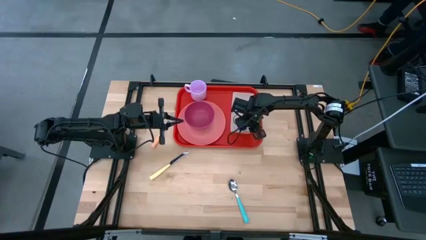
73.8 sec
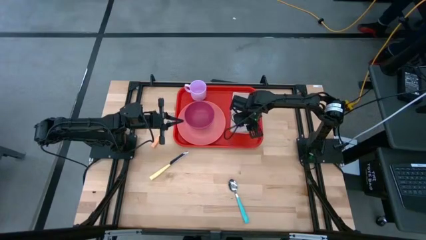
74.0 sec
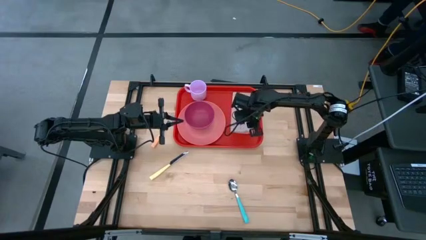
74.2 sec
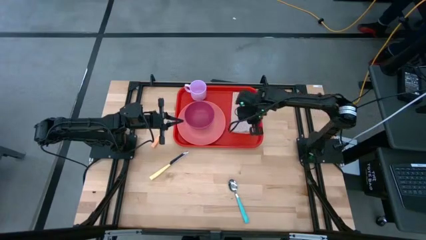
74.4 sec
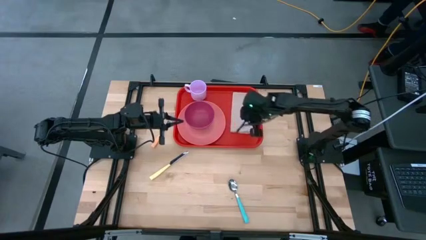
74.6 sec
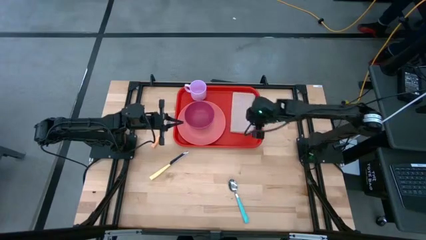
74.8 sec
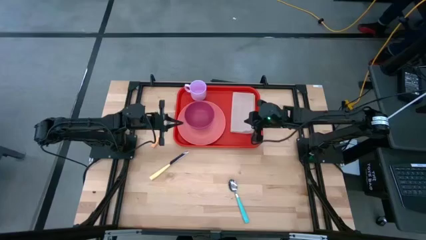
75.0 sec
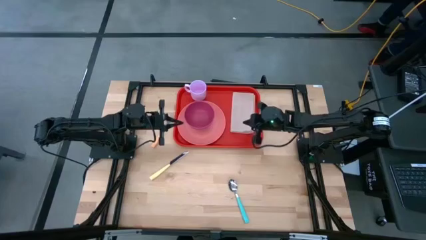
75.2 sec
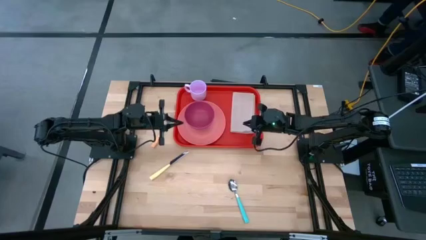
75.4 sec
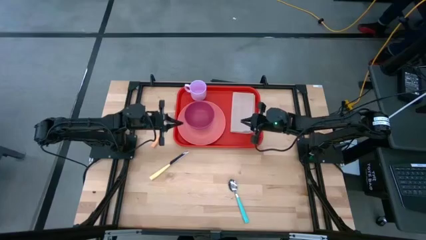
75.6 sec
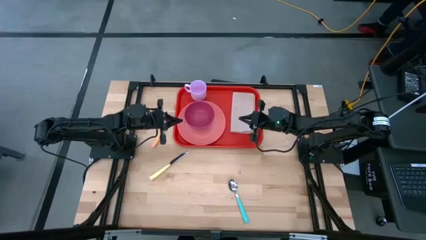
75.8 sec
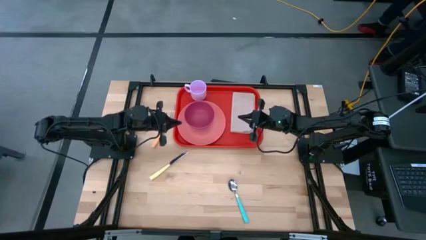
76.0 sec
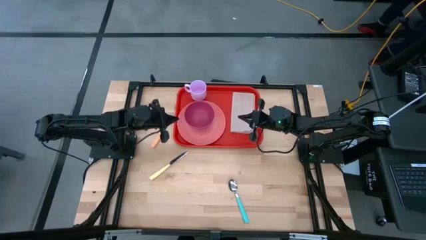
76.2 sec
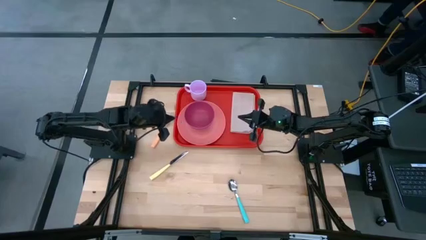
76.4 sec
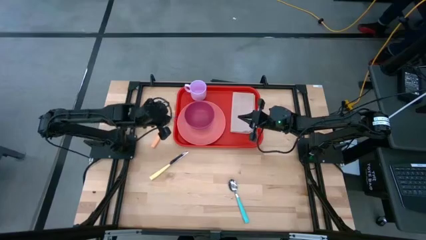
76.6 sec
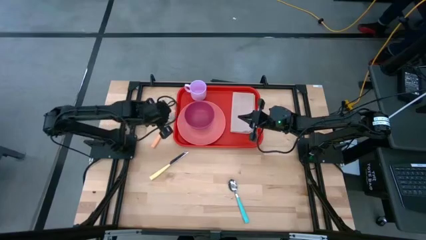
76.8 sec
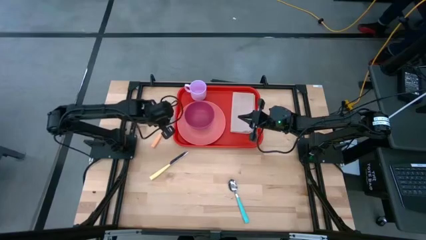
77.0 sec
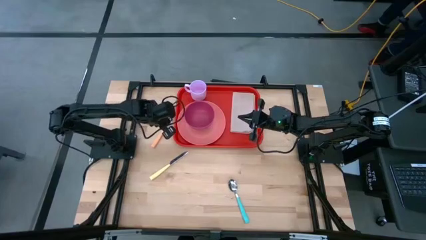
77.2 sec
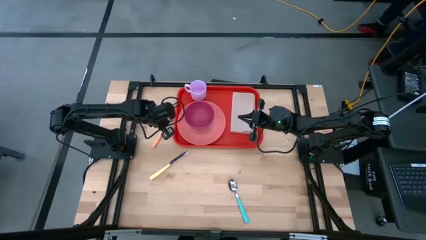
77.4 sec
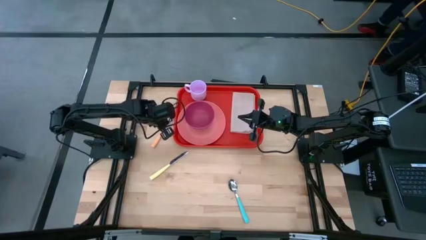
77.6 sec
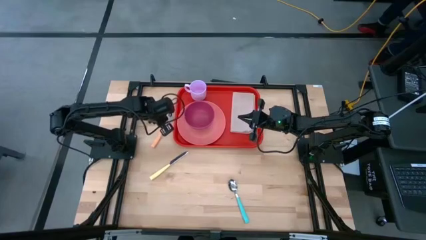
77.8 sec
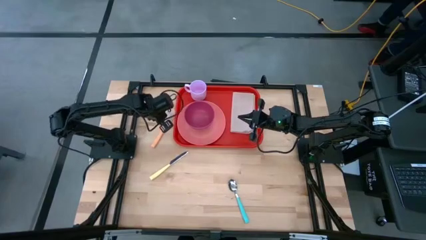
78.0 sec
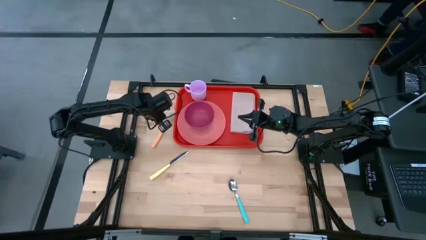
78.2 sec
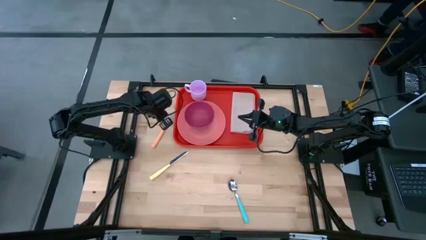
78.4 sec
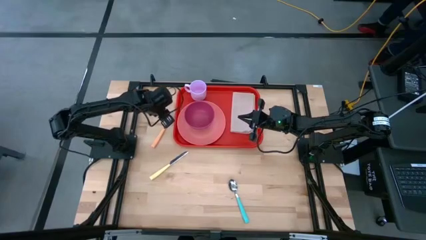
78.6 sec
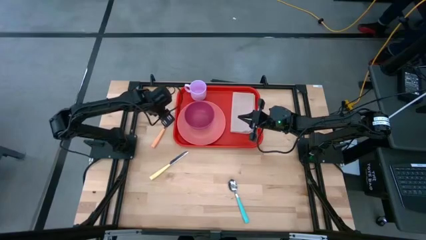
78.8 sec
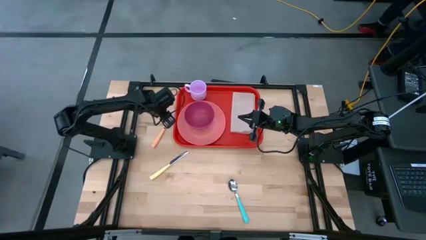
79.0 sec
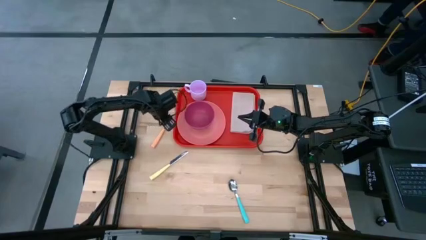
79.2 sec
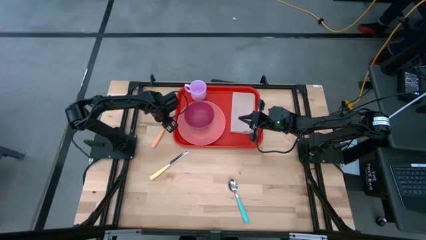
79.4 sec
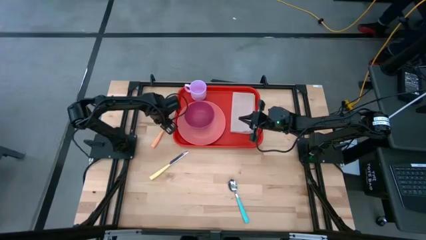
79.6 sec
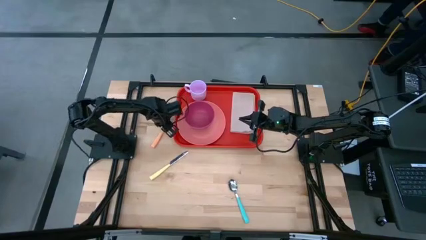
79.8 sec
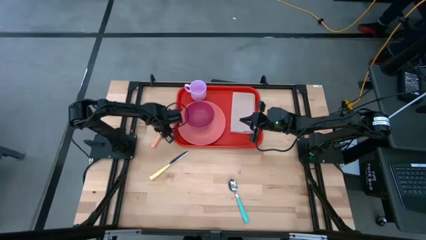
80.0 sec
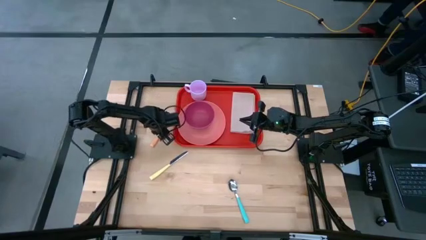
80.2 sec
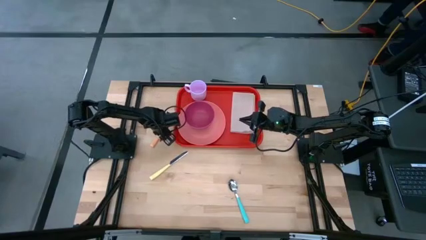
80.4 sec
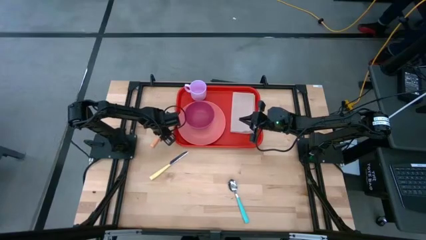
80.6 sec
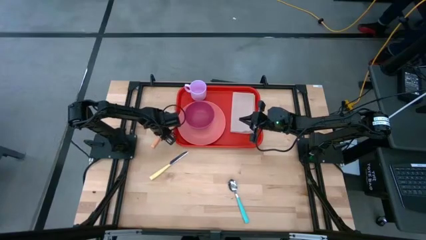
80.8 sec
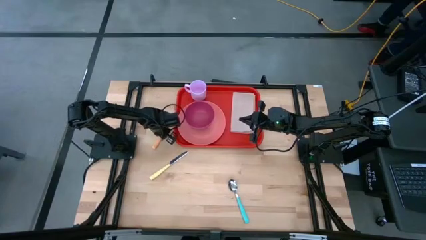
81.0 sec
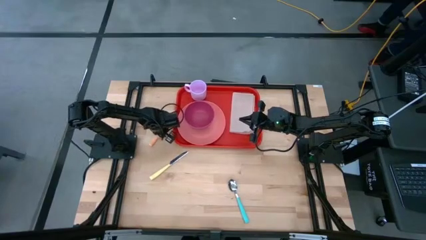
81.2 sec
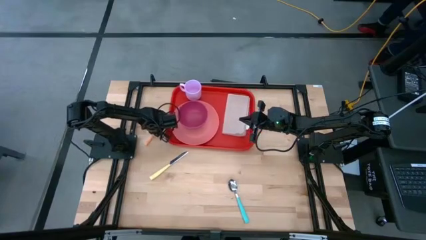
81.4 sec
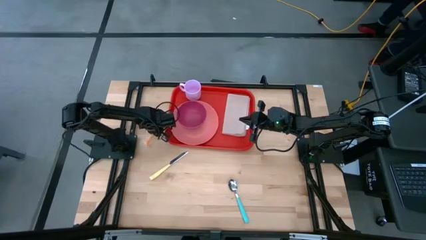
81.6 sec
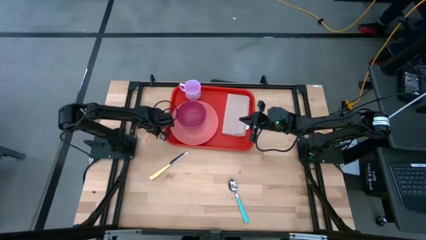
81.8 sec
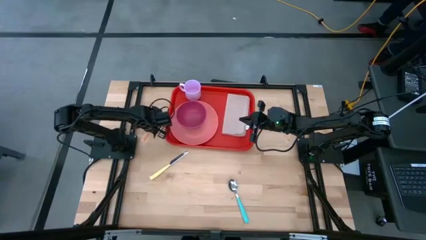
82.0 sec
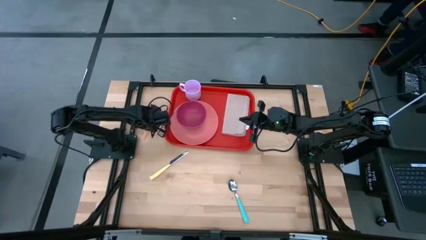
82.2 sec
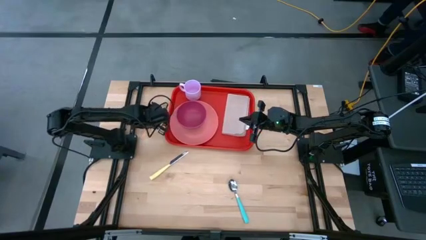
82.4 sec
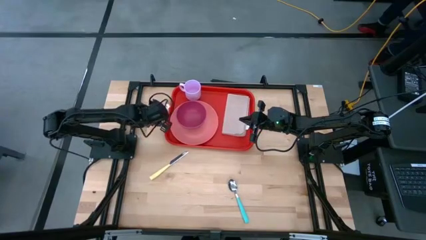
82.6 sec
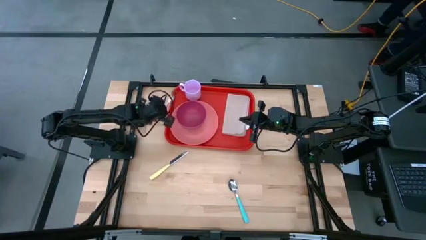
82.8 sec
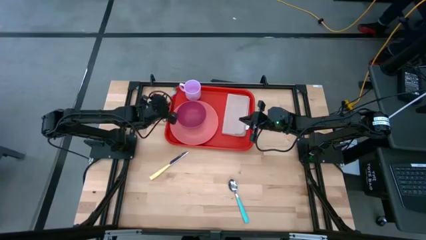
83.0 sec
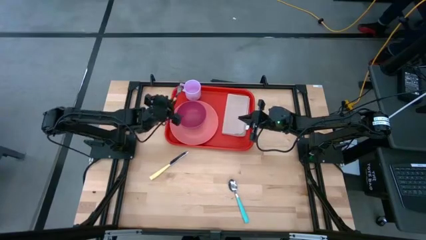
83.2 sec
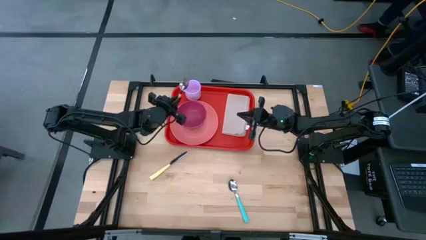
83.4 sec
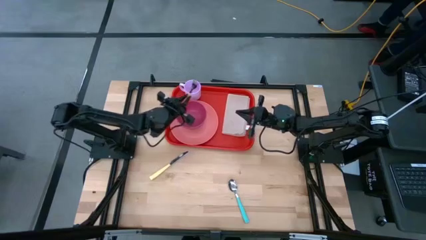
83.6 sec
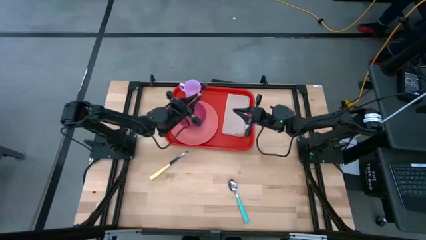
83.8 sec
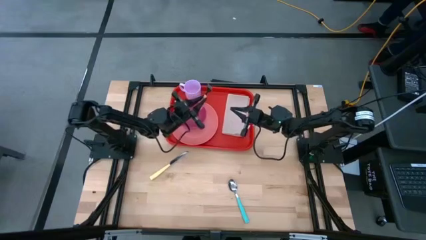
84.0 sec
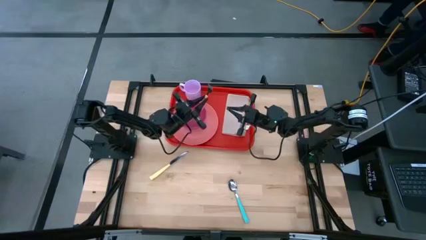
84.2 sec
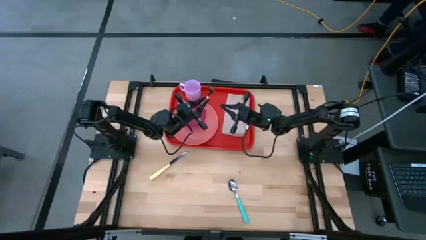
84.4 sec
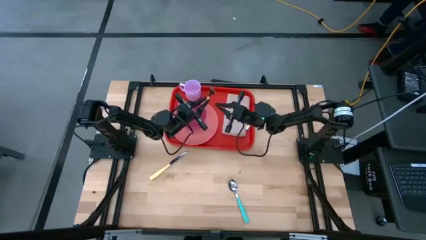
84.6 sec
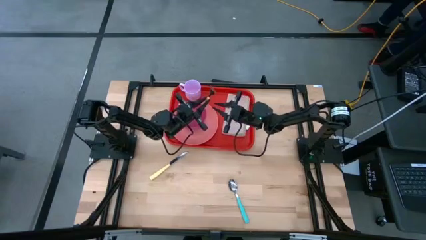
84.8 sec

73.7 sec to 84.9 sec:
Task: Set up tray
Put the orange fork on the light brown napkin

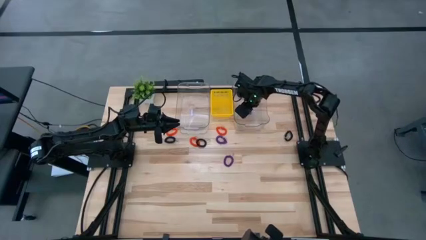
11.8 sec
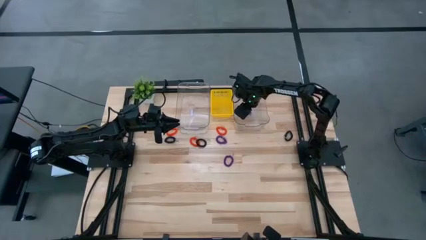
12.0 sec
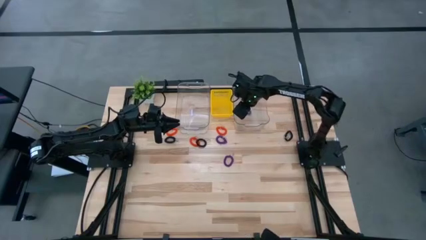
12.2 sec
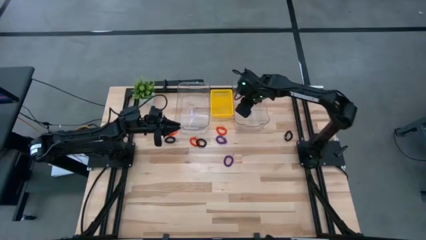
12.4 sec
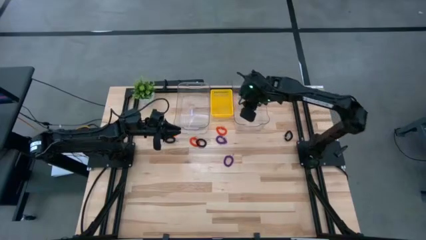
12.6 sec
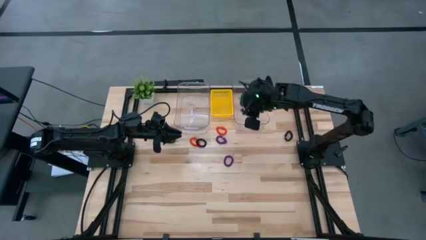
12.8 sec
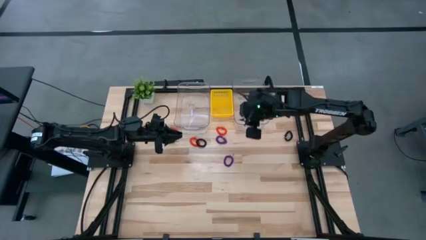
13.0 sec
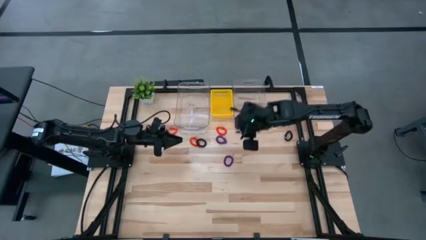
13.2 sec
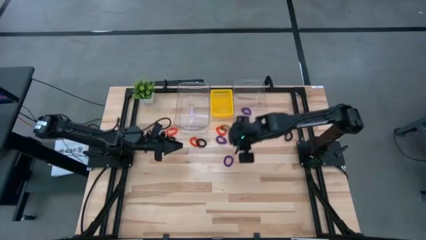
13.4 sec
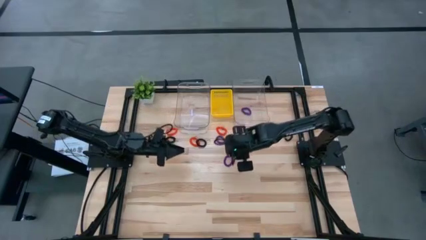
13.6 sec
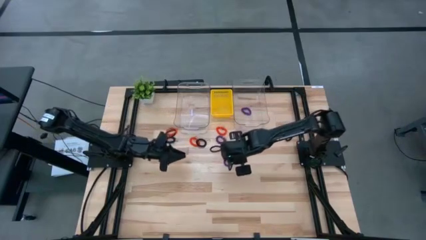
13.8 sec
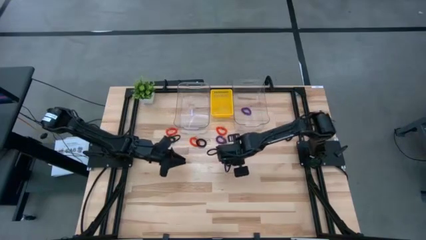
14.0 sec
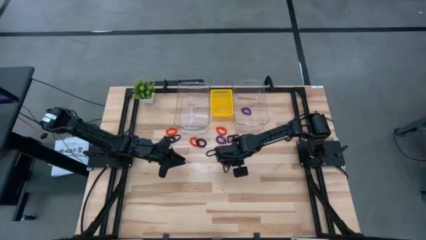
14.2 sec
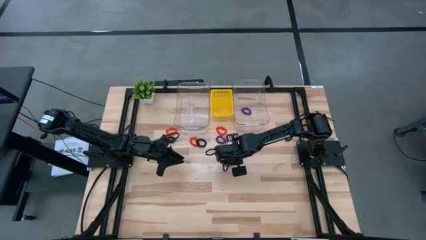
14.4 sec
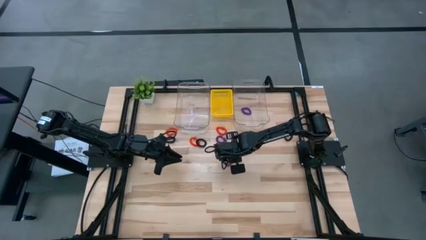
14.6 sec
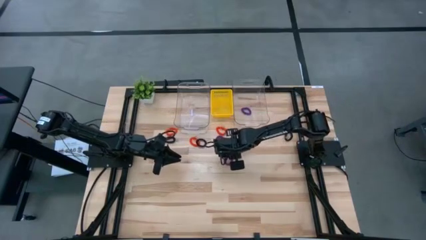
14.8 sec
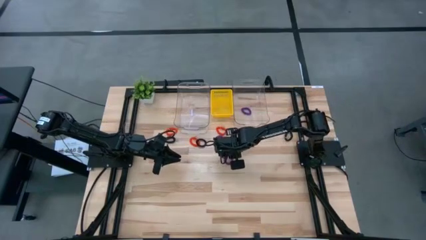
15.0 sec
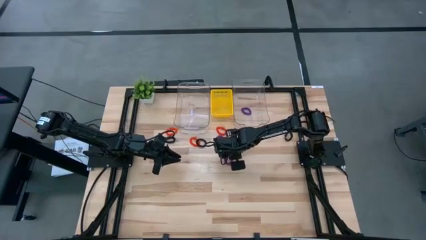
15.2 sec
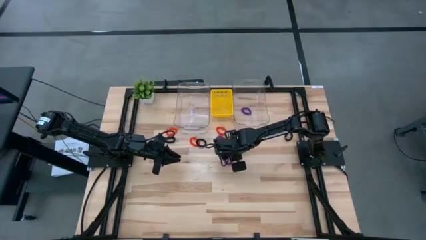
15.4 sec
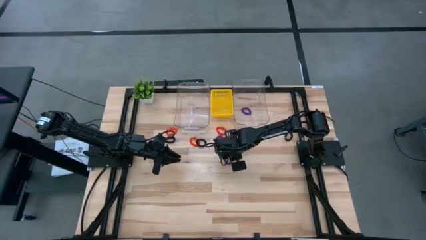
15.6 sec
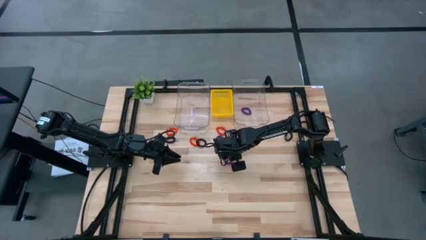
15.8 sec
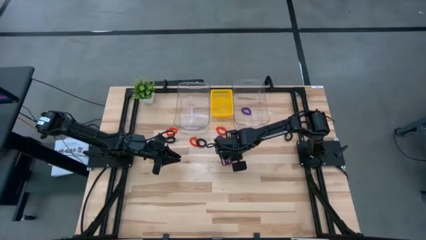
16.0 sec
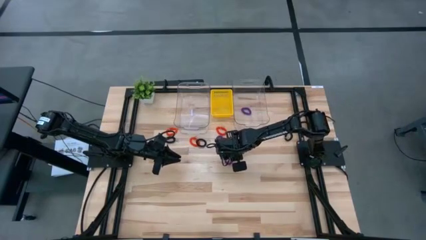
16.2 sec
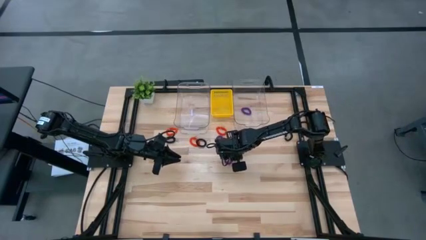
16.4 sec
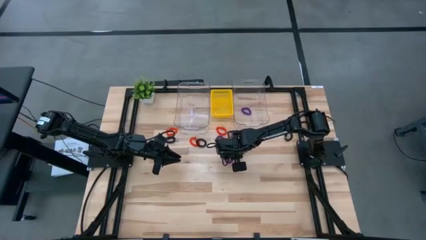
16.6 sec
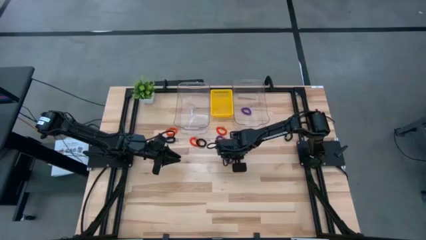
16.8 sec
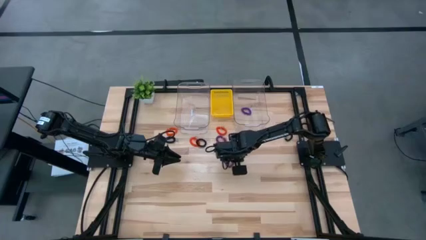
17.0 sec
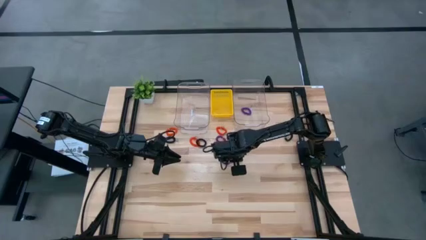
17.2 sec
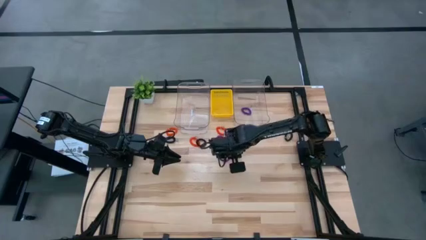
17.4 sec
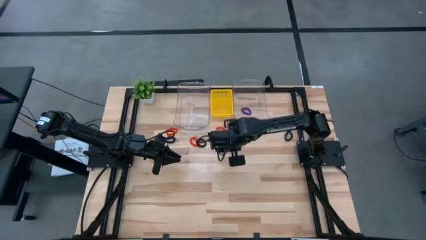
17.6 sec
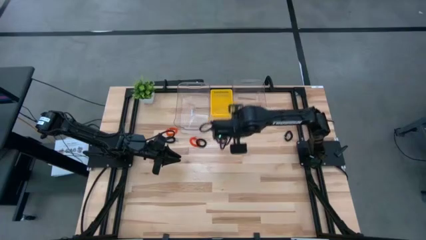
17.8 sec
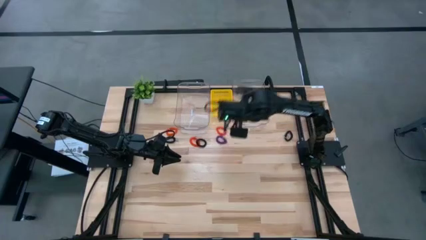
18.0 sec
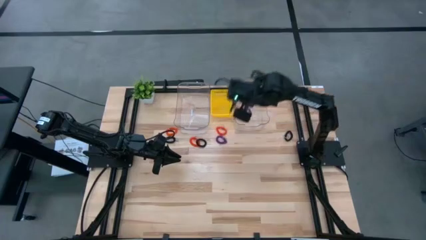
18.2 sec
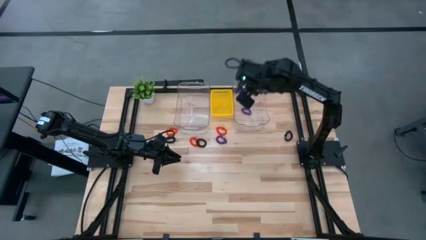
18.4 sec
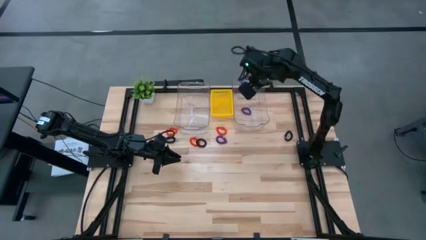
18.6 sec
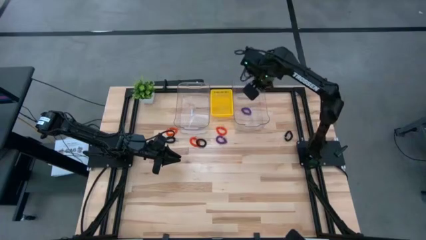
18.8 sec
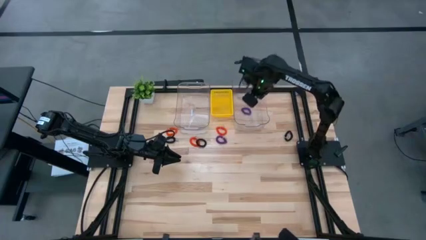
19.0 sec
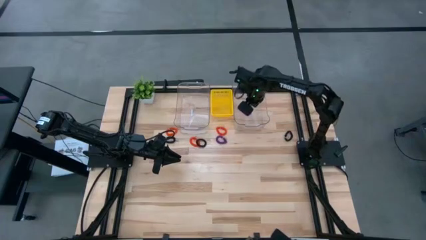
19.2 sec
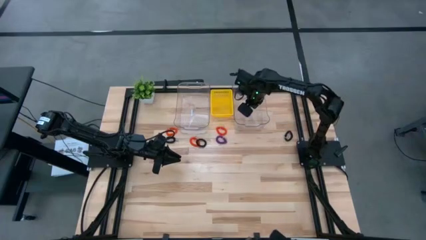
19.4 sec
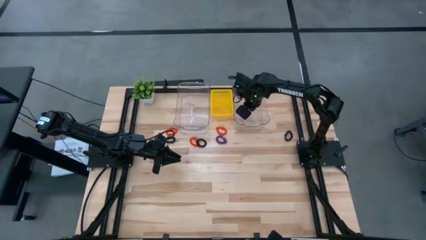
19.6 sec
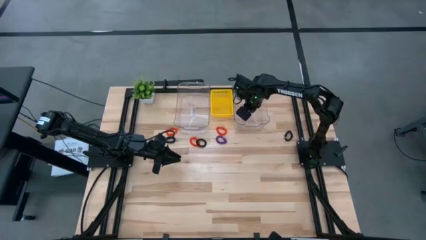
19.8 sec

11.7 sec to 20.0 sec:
Task: Sort spring keychains
Put the bottom purple spring keychain into the right transparent bin
